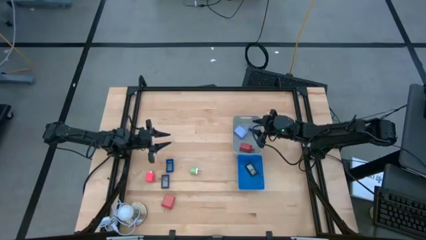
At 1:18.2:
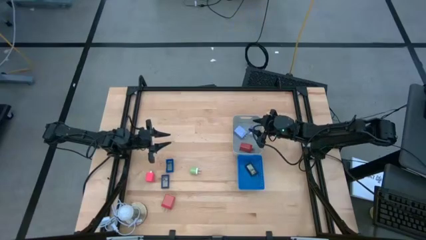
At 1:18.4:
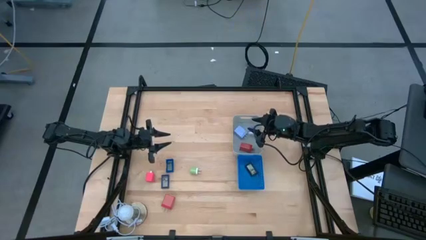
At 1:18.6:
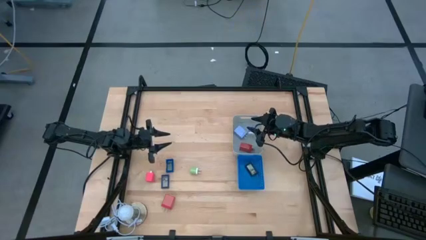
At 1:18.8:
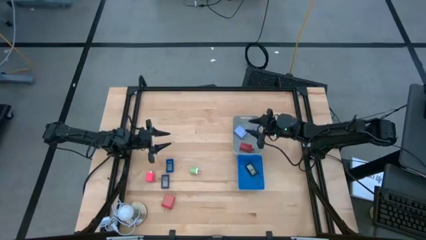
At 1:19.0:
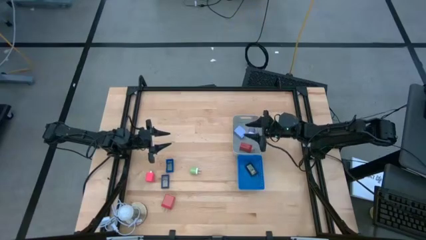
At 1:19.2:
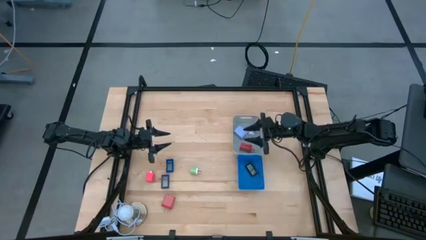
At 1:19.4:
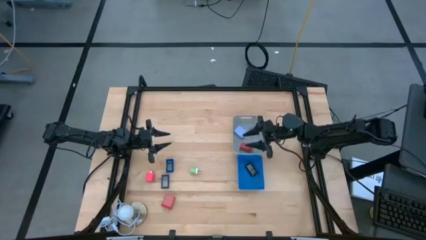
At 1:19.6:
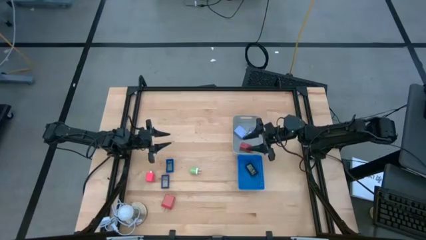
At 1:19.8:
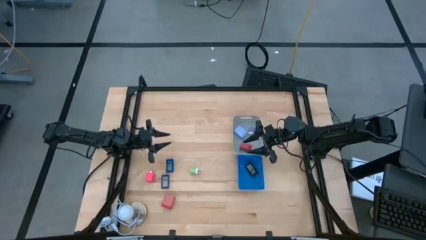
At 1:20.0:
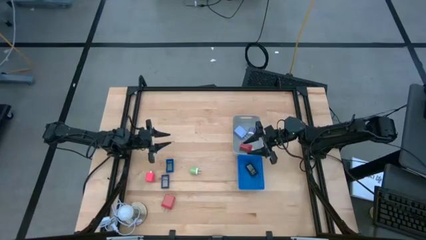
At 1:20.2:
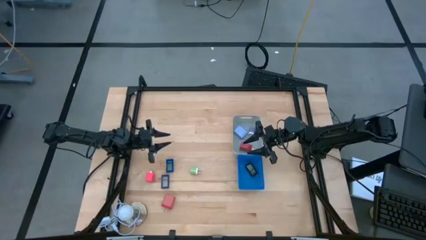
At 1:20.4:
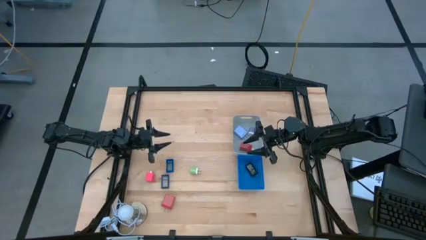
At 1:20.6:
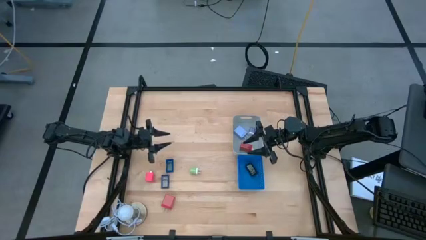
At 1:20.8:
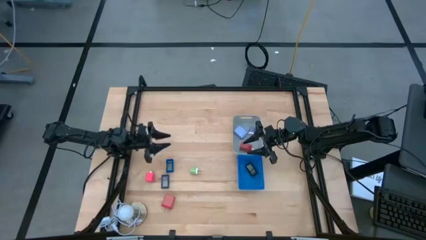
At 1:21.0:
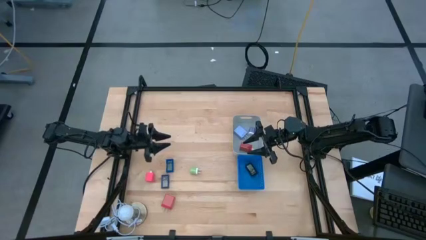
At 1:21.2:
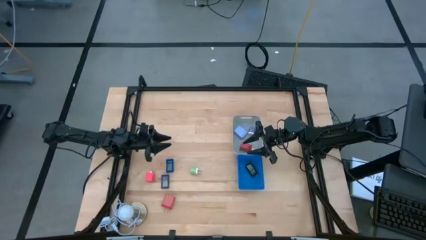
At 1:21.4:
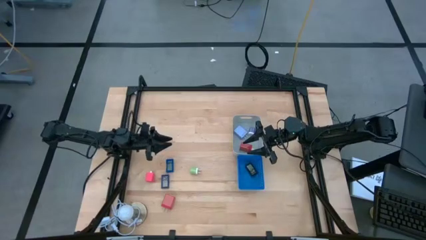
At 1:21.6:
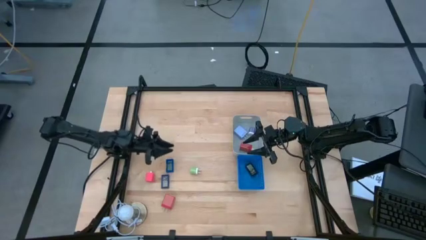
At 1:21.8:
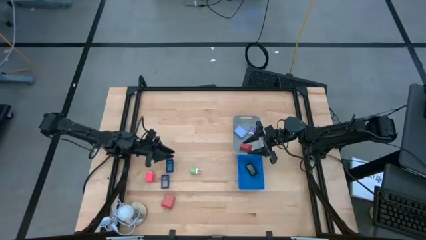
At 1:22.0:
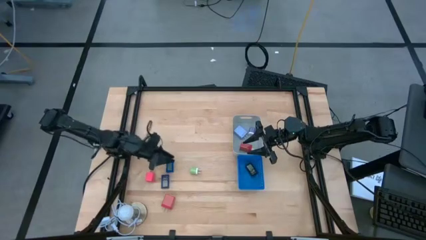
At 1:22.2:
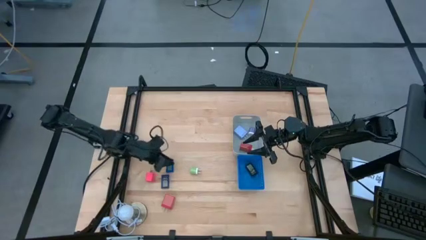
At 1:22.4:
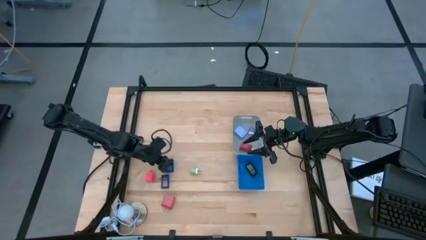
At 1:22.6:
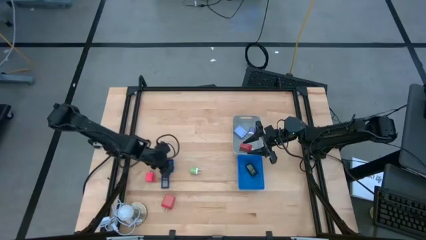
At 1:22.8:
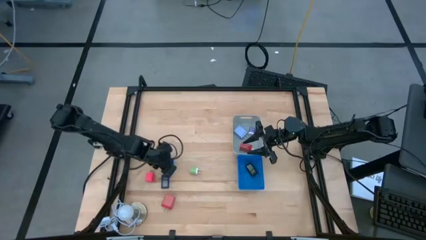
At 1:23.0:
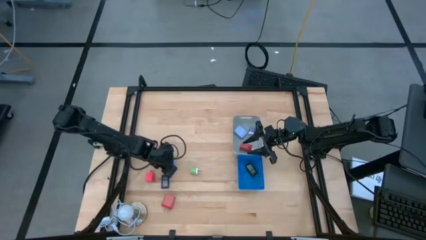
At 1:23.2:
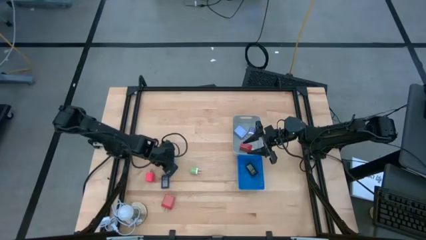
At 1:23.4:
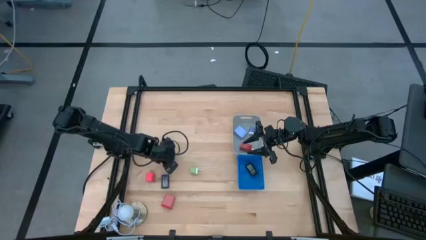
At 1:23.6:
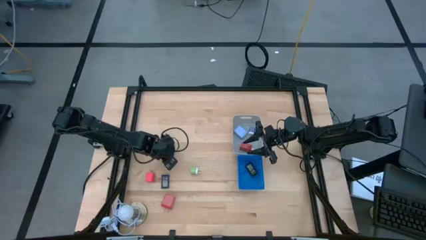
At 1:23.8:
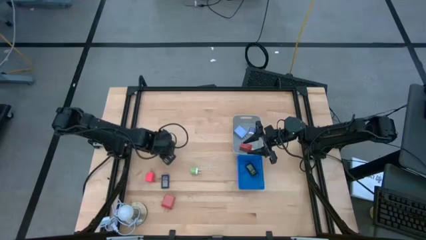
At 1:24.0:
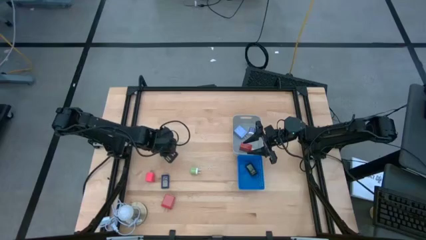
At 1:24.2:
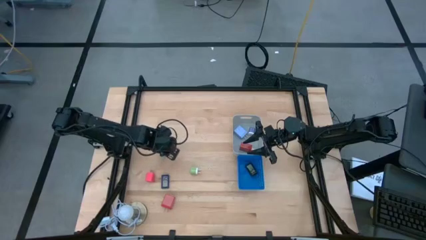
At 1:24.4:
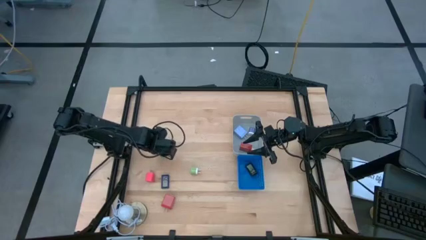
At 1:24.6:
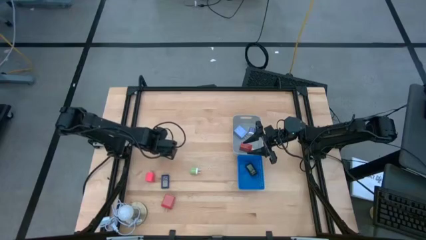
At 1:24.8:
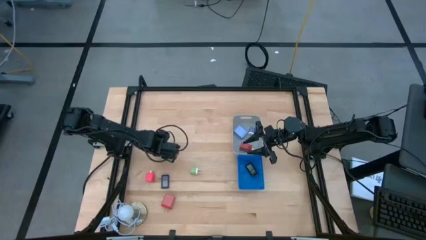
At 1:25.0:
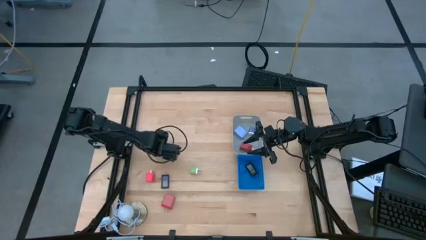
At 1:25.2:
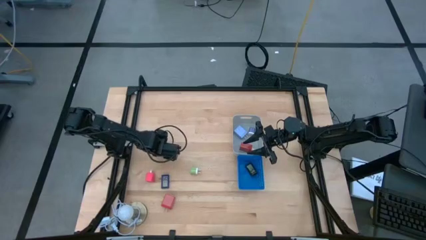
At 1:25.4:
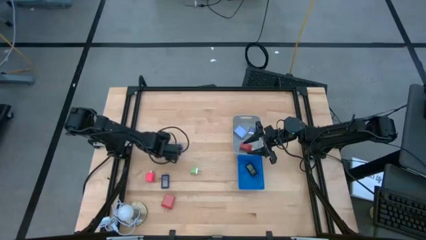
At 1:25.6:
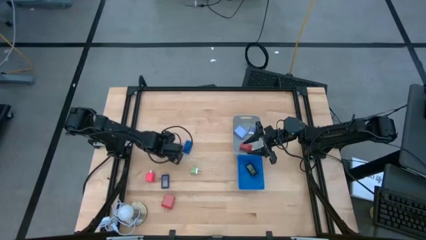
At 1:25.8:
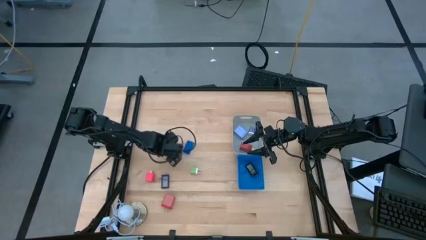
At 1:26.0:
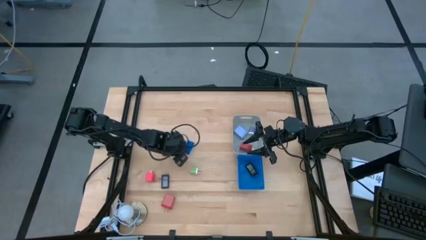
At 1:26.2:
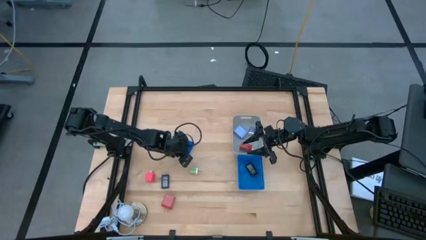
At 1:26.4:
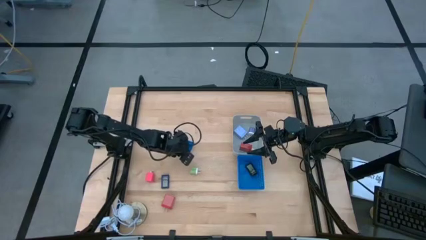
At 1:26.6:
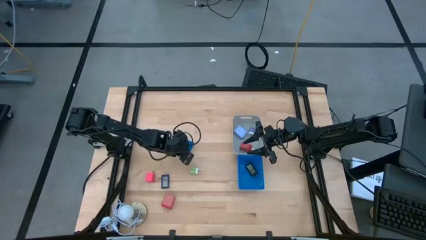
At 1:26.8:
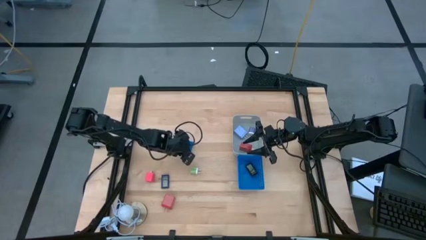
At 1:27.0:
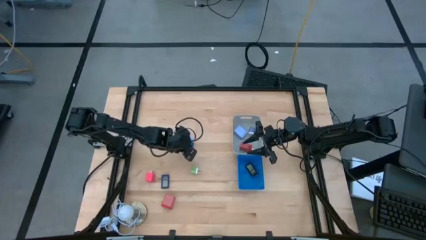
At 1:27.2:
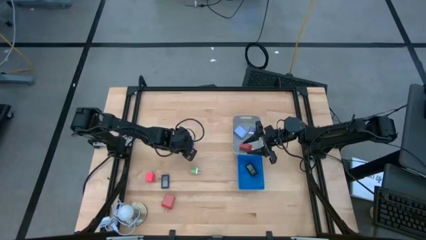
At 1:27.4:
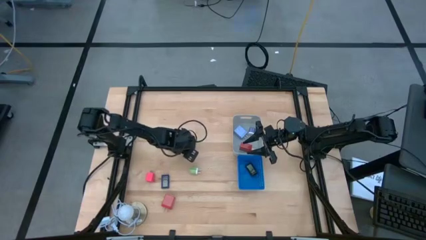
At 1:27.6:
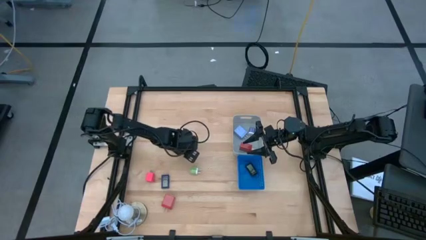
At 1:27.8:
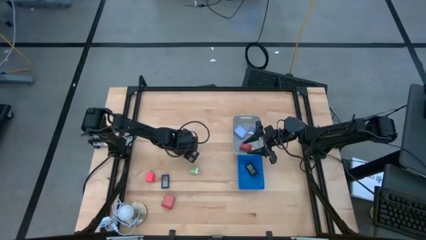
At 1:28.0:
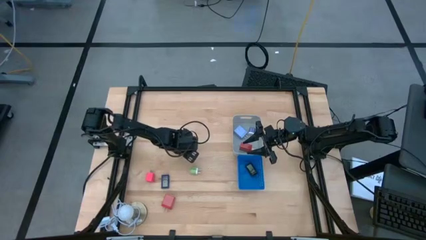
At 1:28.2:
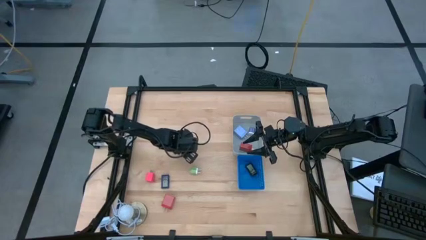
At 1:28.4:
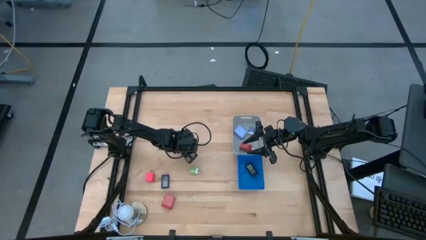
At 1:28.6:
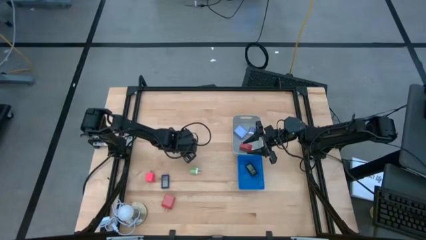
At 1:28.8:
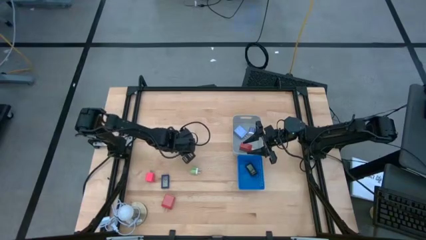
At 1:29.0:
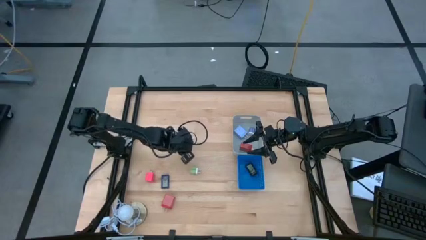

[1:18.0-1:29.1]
Task: Pick & Place Office items
Put the top blue digital clock into the blue bin

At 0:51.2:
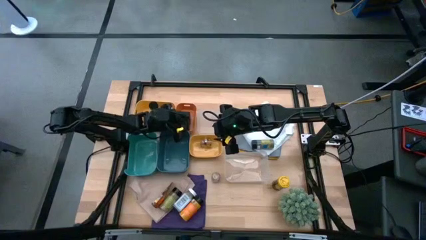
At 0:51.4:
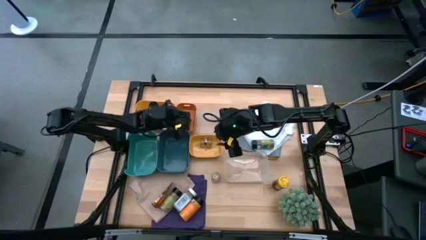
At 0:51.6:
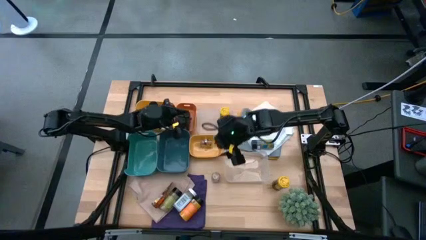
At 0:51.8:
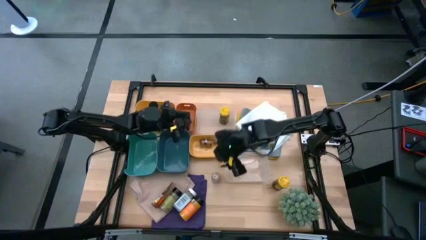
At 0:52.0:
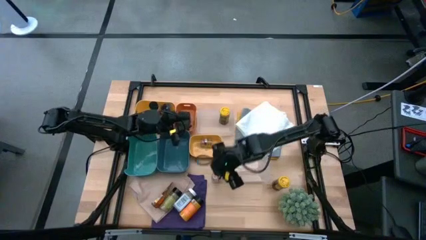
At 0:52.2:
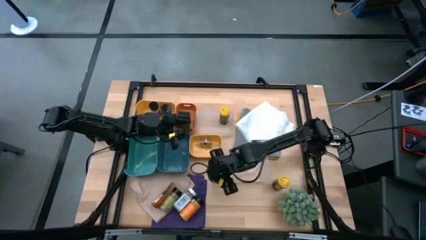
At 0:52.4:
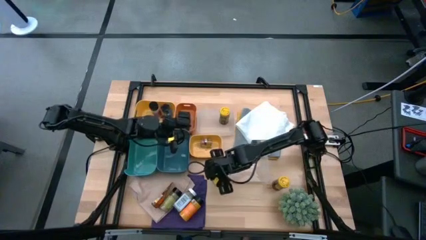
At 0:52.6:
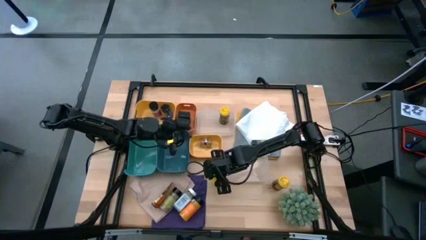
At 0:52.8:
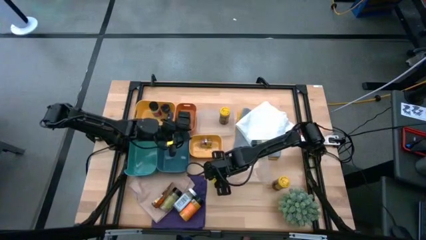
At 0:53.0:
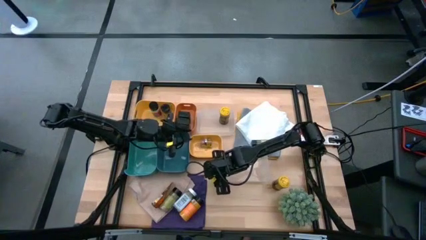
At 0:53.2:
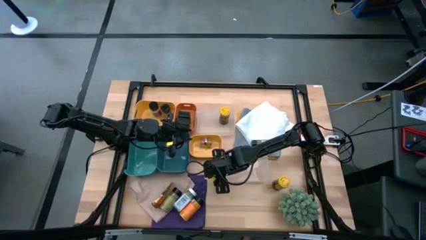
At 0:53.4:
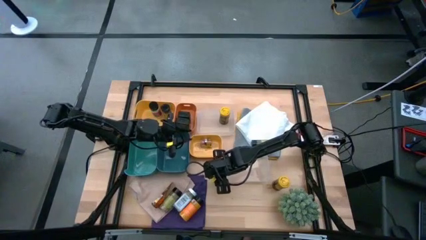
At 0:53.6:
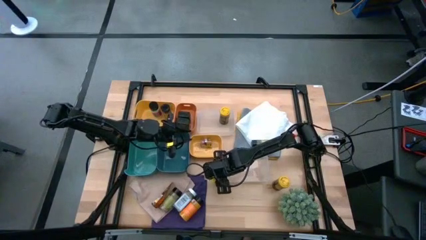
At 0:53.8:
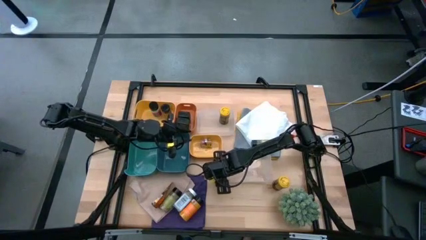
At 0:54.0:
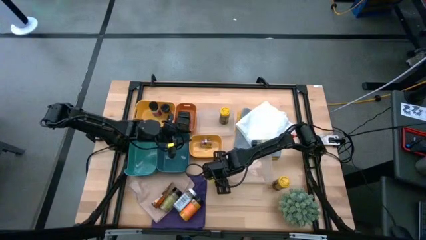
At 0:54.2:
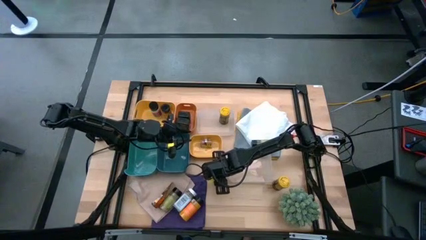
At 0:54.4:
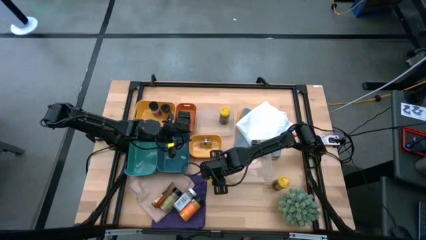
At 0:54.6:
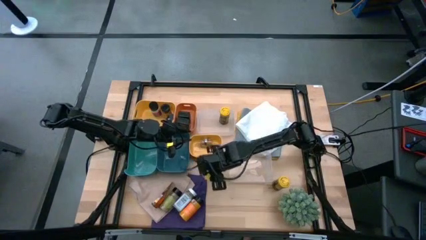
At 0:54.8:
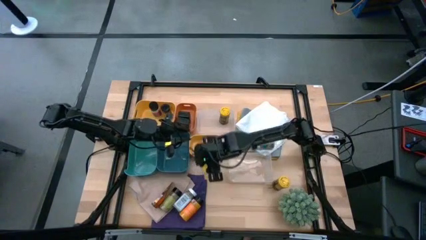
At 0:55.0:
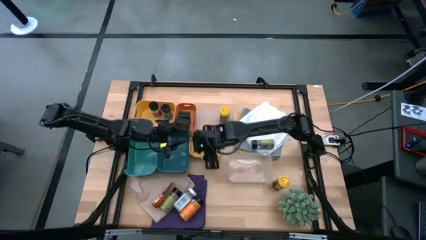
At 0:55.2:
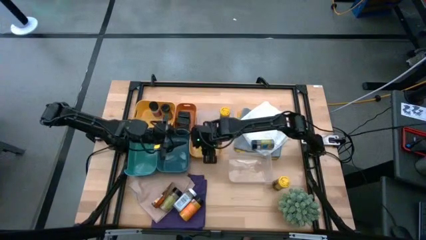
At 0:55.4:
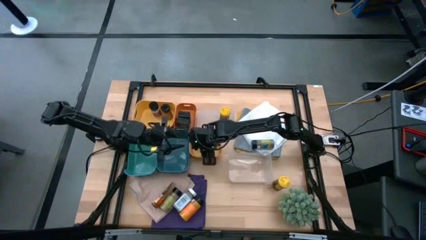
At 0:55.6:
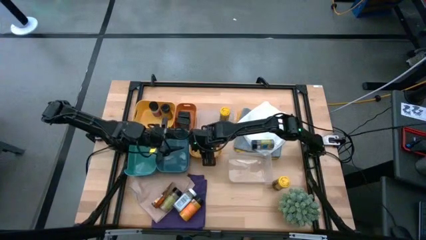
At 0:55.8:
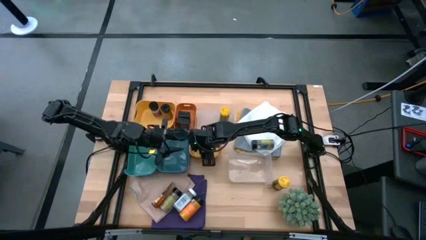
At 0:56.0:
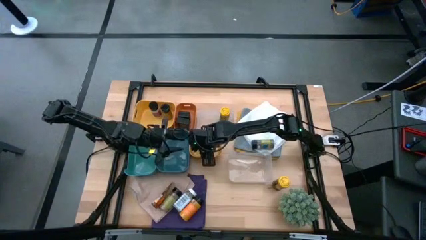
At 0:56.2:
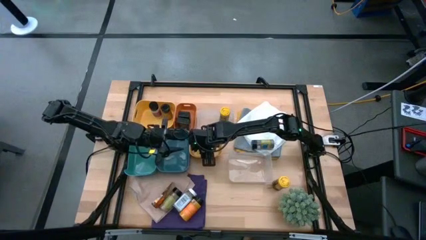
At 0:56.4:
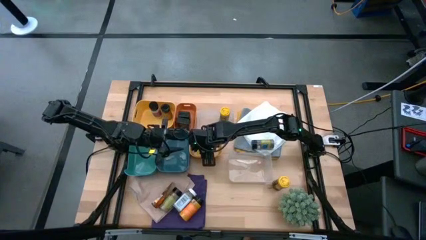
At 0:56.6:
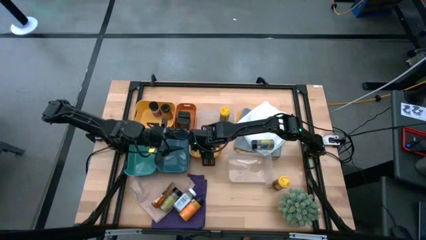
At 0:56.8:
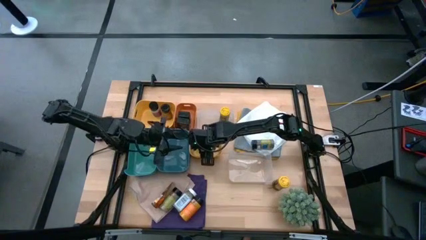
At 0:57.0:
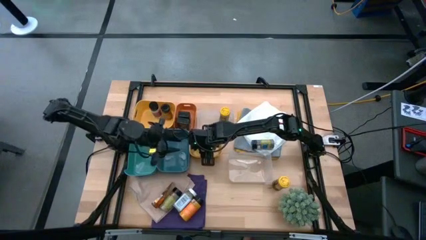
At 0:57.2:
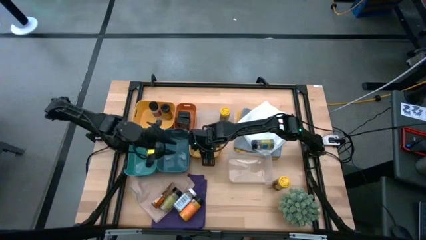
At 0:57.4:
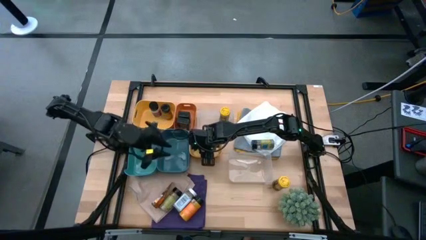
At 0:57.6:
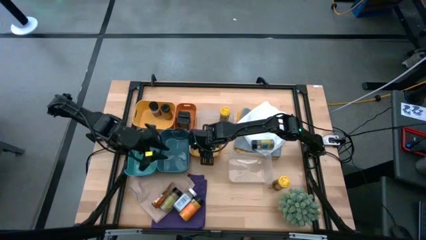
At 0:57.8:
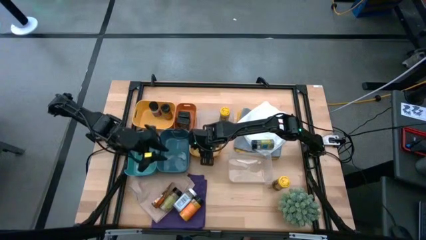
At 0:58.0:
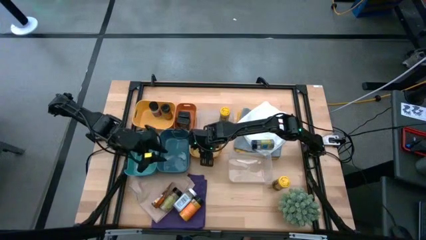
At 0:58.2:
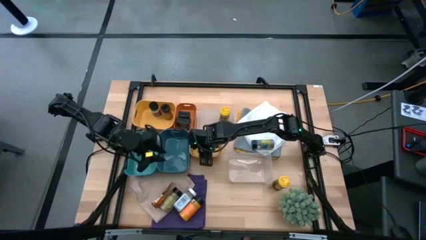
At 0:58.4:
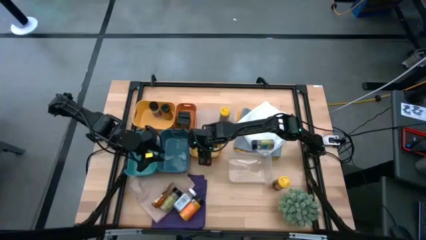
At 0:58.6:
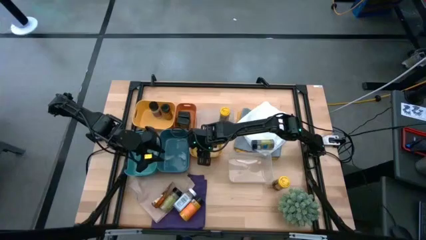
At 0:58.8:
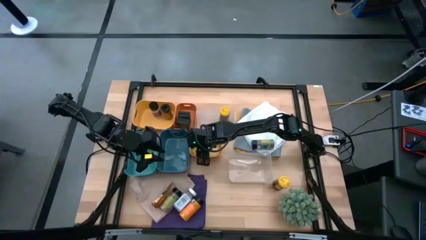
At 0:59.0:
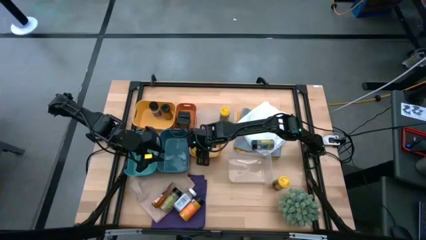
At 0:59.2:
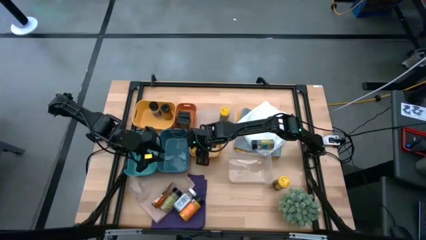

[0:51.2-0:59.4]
Task: Sort spices by type
Put the brown spice bottle into the bottom yellow bin
